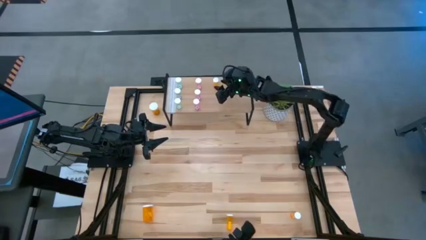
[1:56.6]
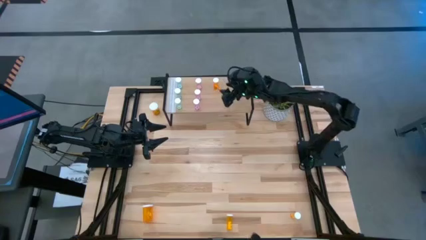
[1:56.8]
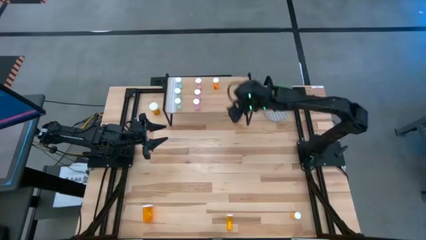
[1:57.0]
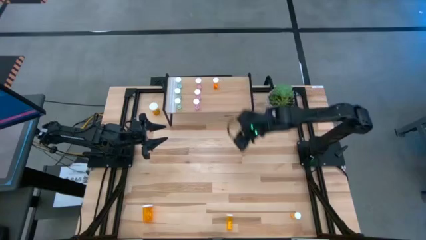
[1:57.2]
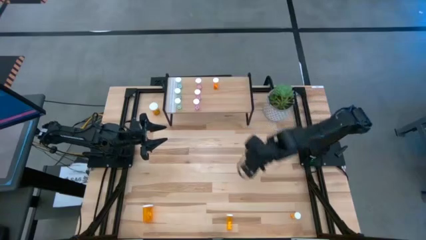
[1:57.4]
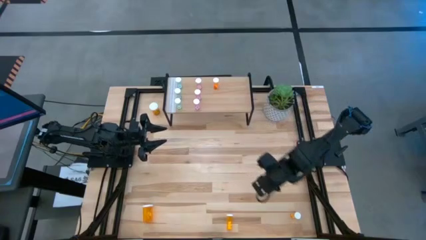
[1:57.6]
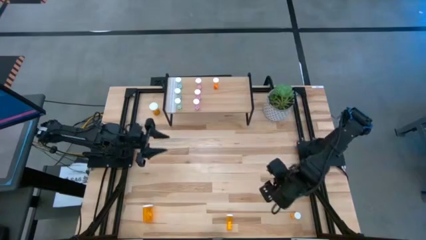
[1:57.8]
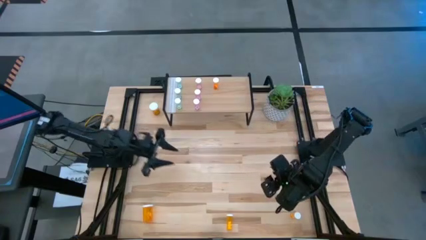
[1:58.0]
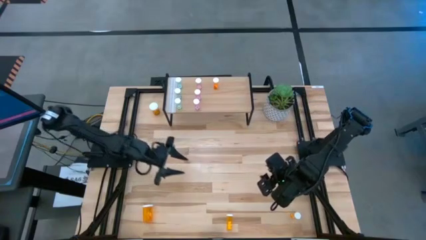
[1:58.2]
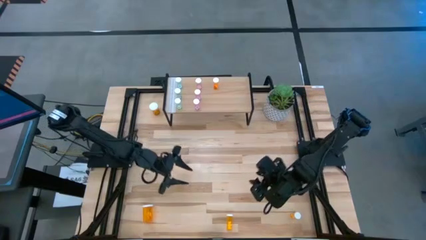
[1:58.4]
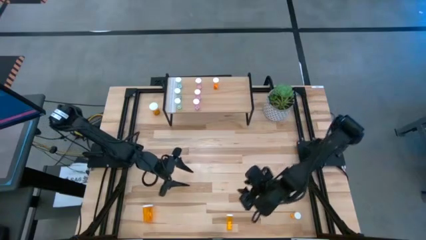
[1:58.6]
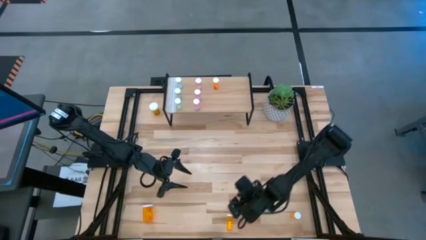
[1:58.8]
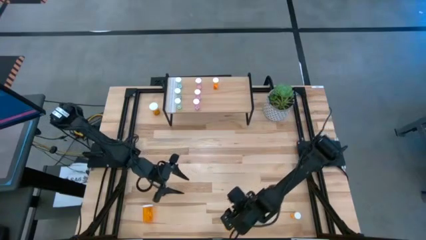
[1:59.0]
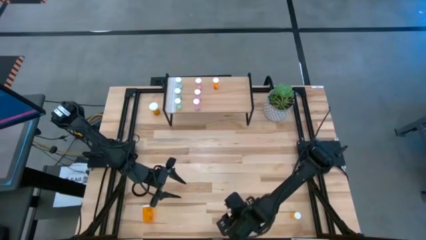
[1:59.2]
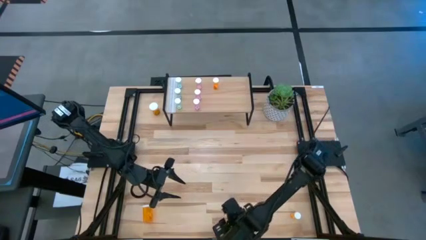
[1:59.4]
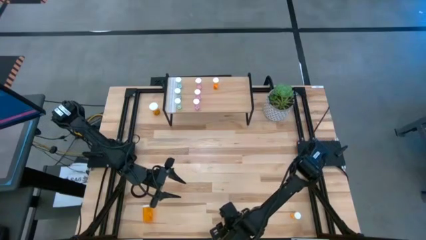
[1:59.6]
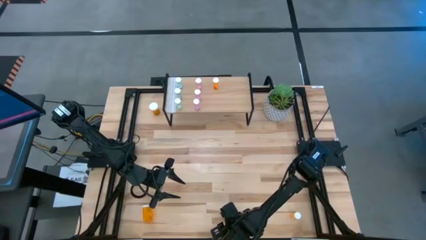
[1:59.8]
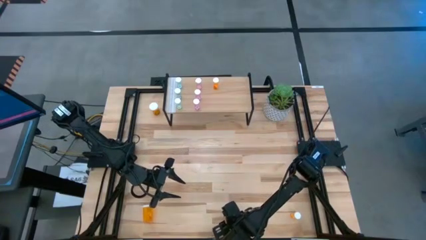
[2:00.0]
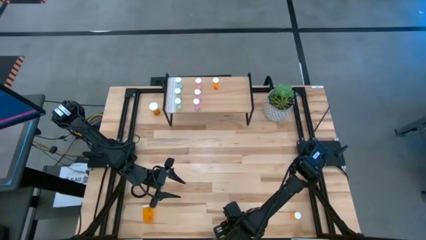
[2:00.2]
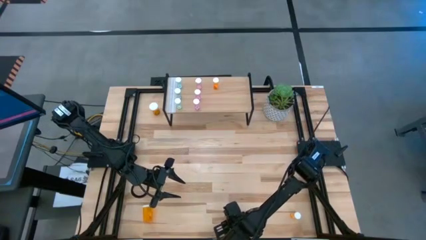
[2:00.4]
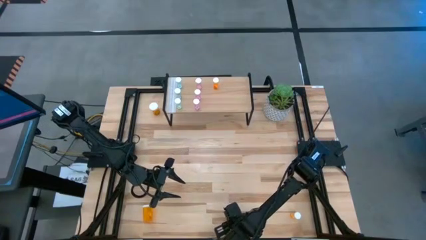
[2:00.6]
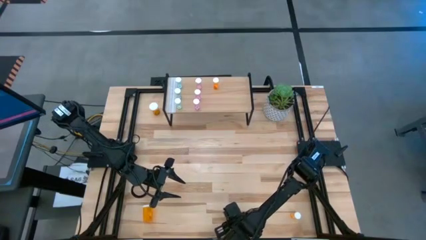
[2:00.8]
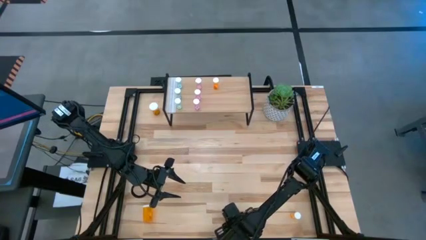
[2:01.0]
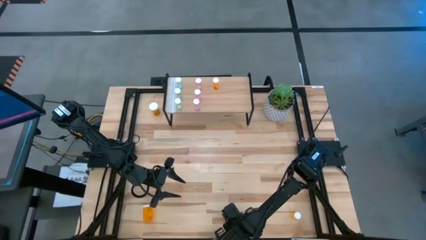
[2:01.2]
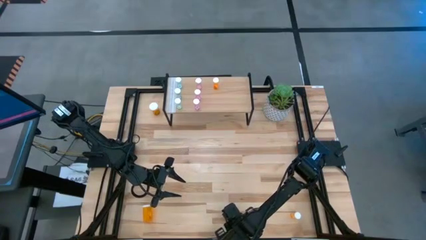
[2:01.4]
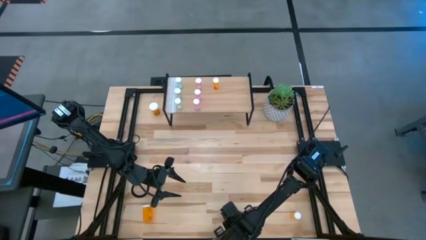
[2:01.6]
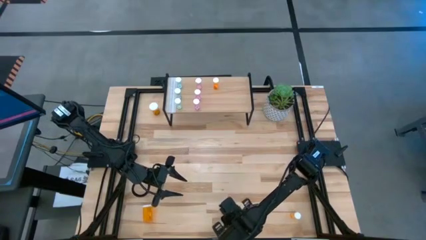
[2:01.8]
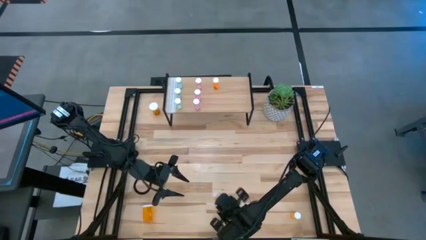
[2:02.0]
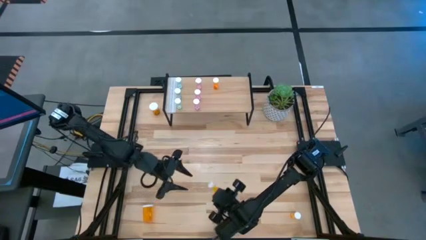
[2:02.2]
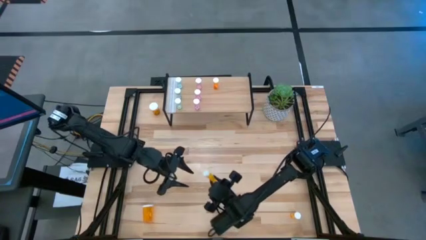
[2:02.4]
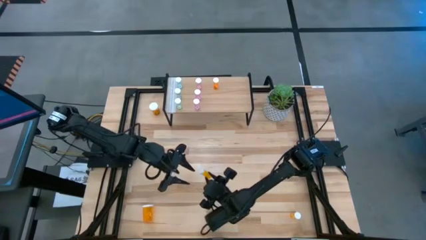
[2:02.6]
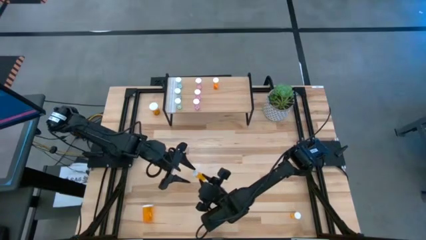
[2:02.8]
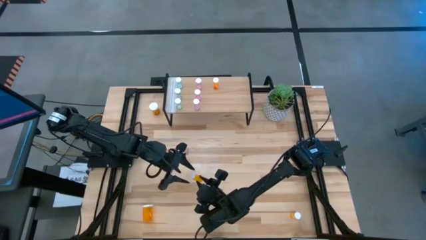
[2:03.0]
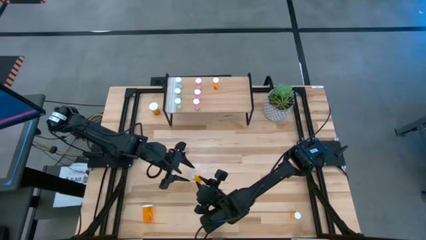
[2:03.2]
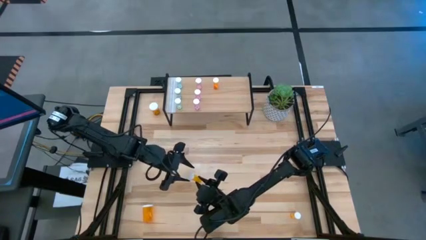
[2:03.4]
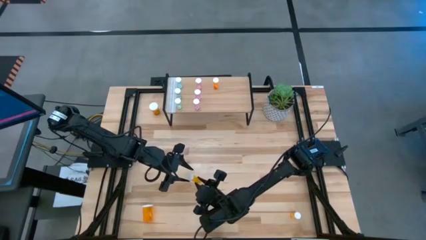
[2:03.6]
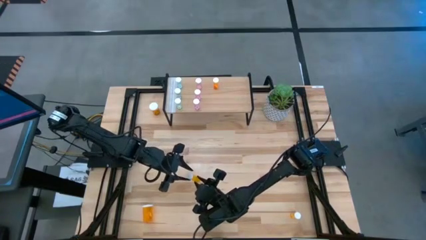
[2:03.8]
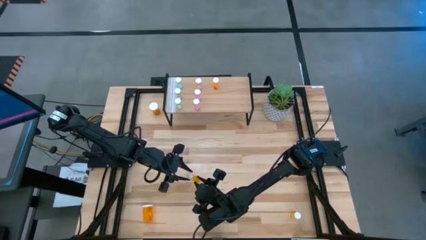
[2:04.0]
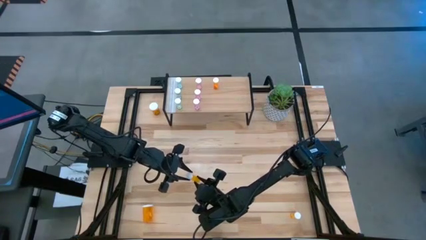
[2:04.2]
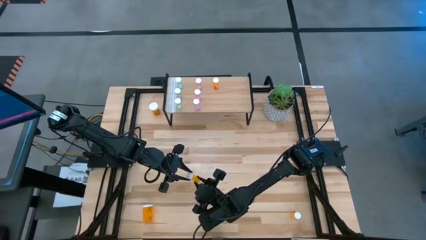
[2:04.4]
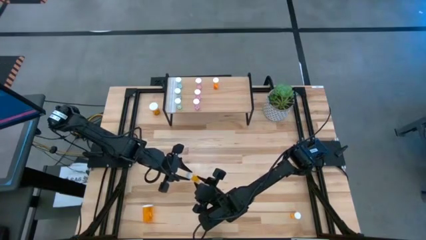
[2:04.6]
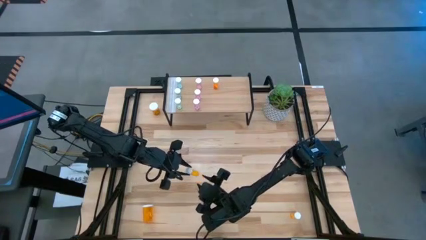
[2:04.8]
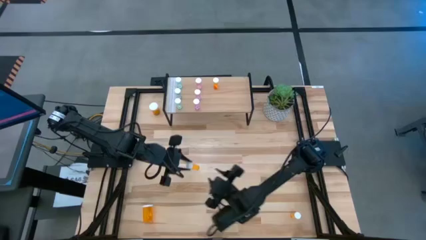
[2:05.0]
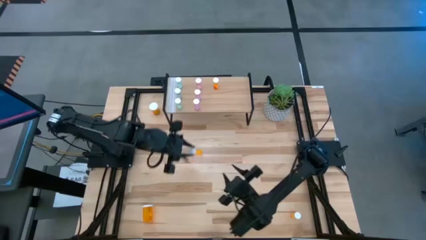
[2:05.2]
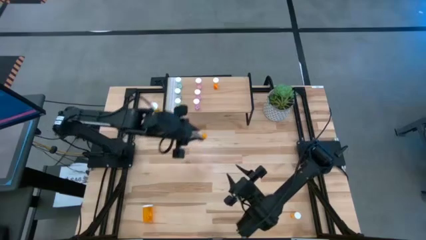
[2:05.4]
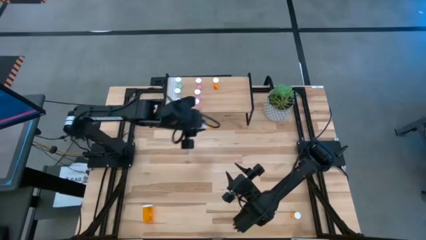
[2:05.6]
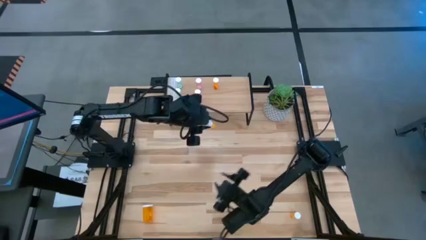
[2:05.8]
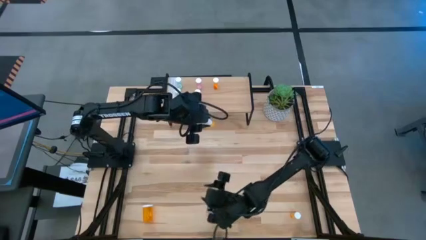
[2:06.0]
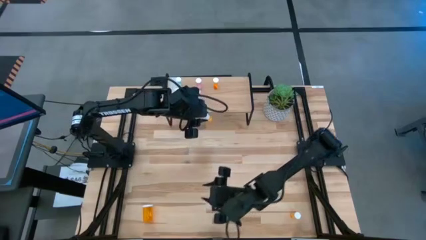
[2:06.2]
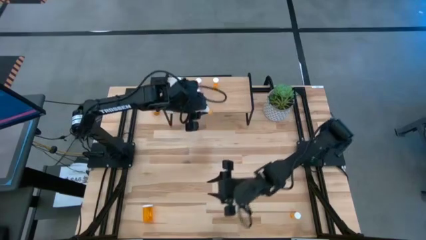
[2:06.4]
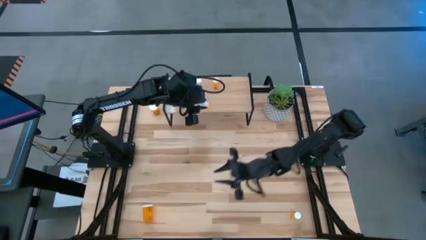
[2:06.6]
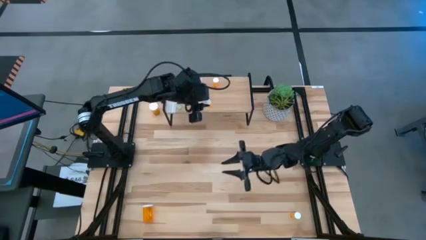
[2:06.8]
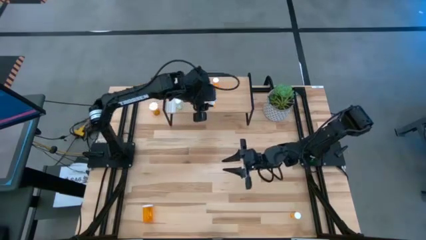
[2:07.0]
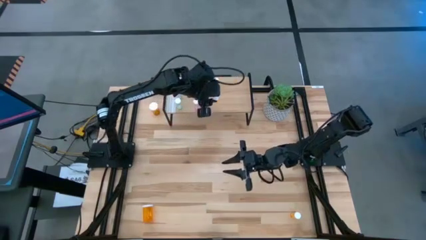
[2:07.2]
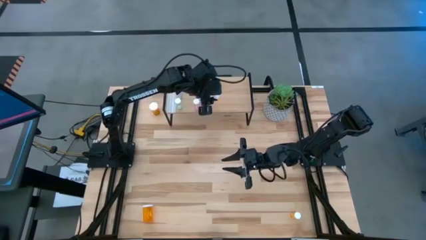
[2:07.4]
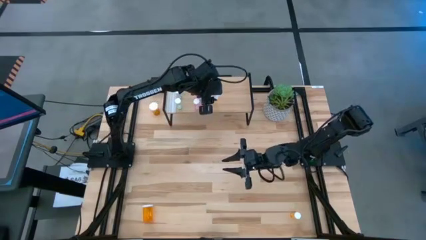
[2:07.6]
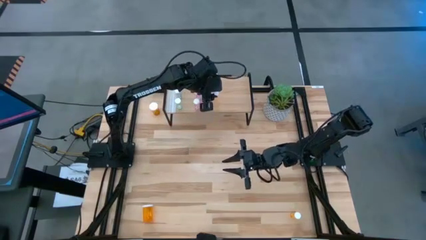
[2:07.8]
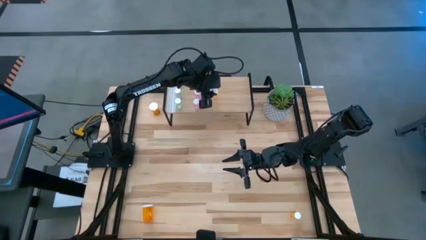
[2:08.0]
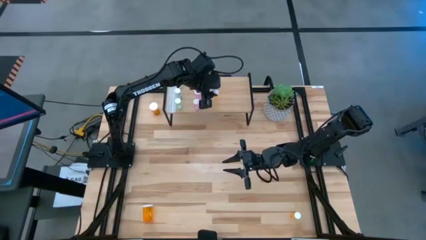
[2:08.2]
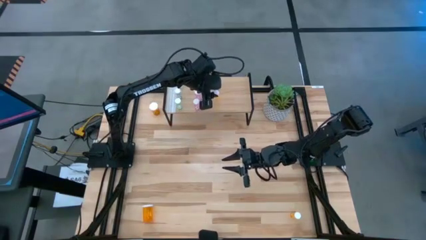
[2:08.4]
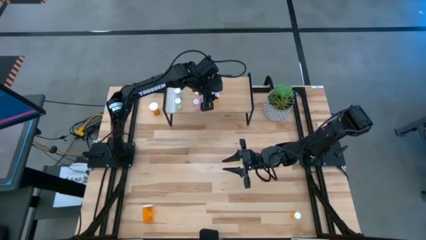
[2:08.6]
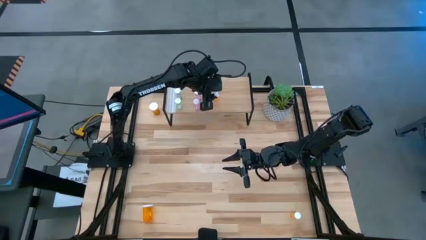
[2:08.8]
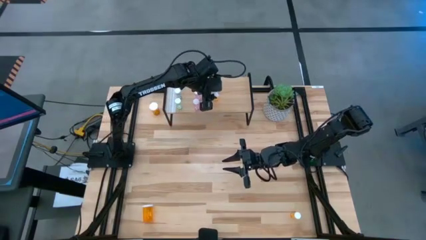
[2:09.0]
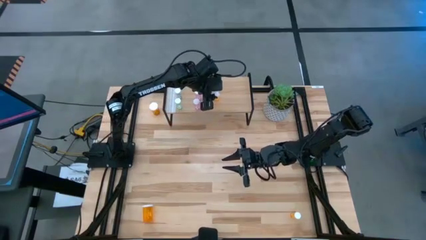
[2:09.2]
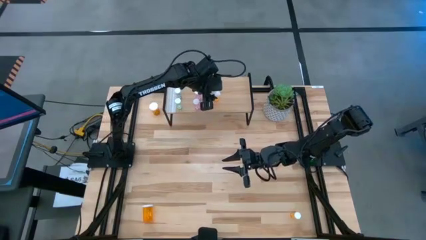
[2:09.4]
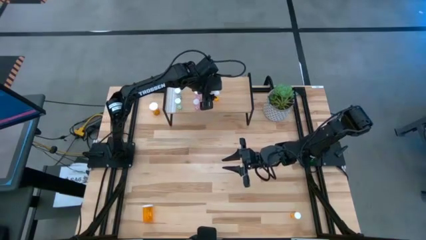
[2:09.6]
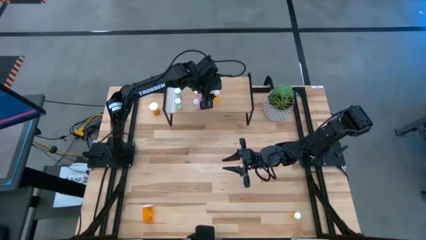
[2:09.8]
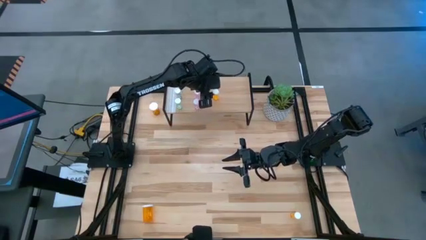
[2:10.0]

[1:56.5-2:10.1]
Task: Pick and place medicine bottles onto shelf by color
Put the left small orange pill bottle on the shelf aligned with the other small orange pill bottle
